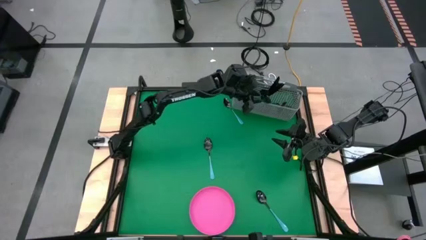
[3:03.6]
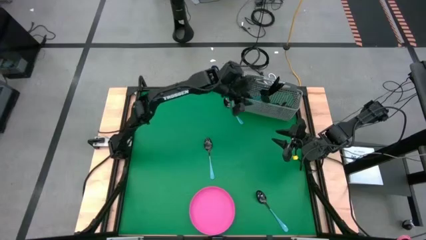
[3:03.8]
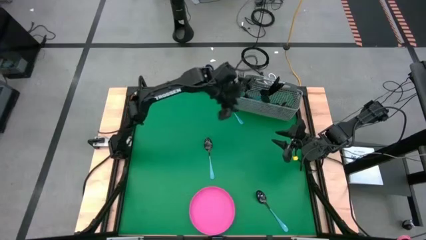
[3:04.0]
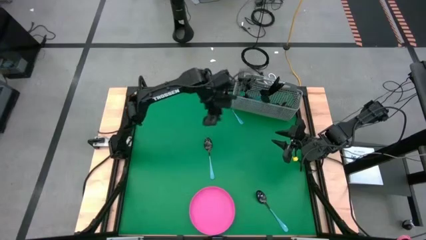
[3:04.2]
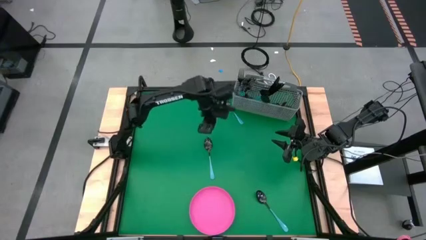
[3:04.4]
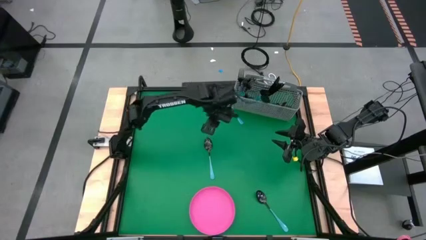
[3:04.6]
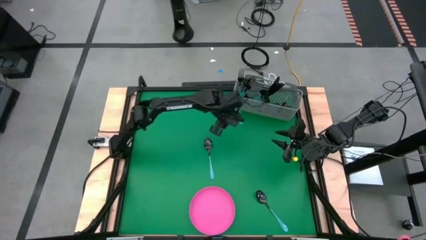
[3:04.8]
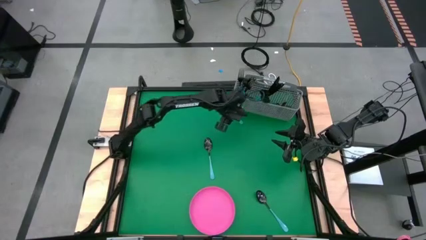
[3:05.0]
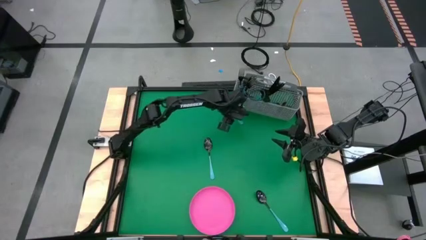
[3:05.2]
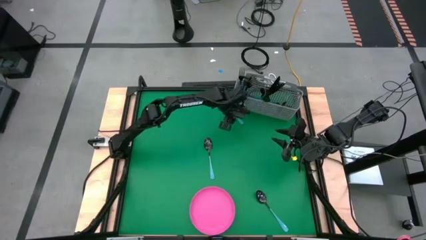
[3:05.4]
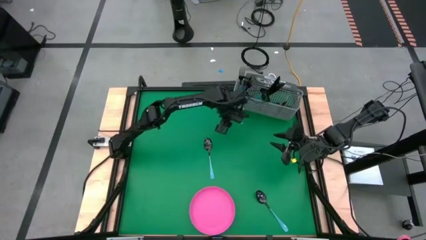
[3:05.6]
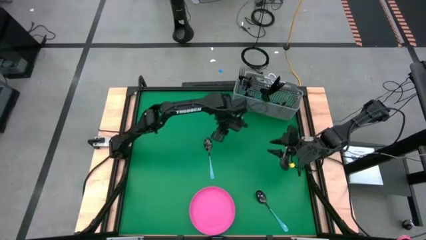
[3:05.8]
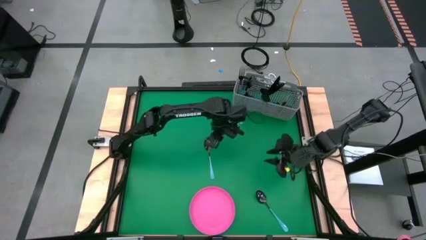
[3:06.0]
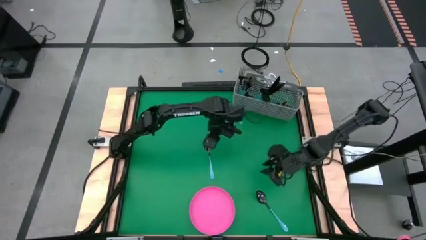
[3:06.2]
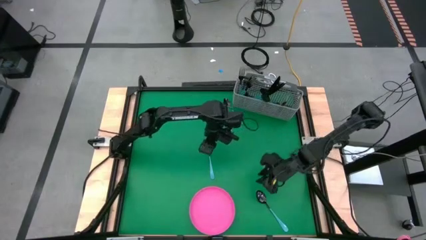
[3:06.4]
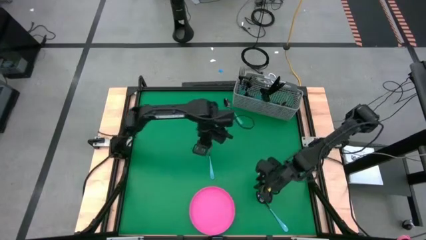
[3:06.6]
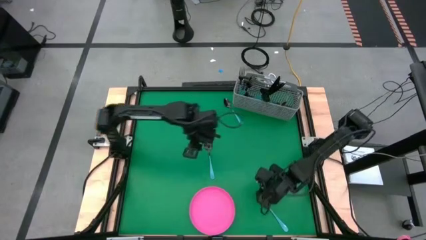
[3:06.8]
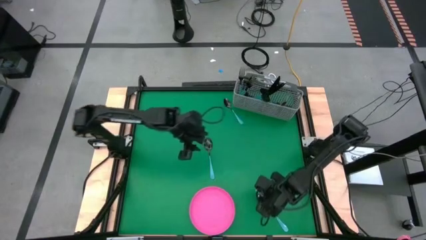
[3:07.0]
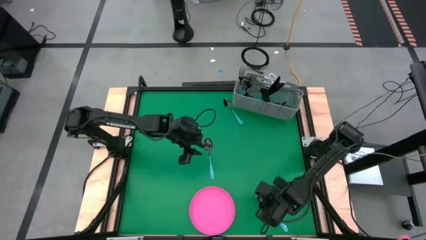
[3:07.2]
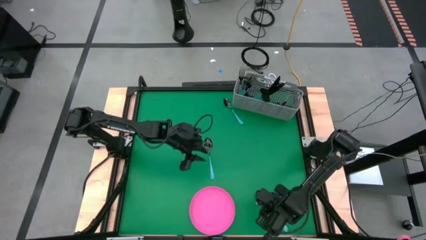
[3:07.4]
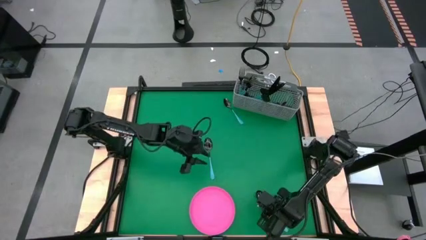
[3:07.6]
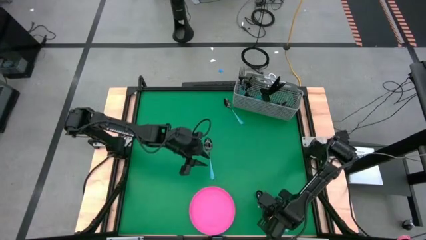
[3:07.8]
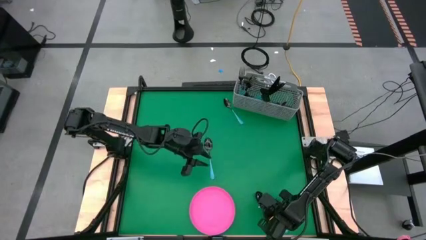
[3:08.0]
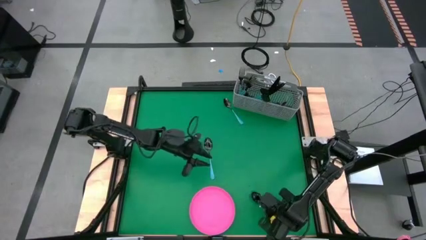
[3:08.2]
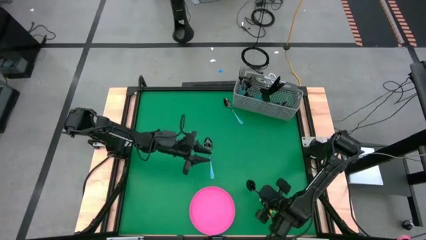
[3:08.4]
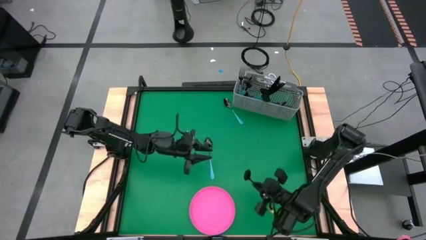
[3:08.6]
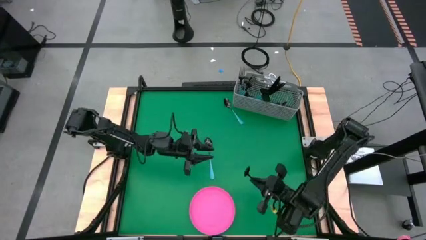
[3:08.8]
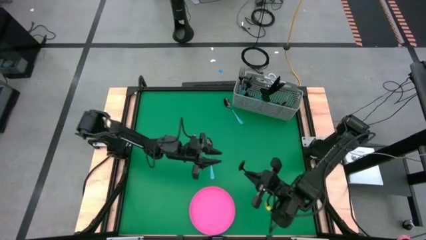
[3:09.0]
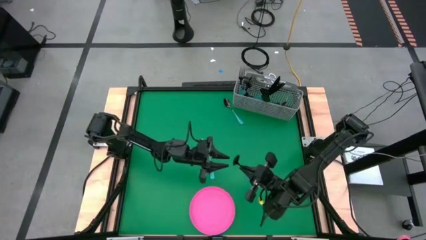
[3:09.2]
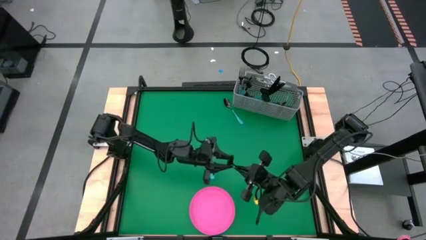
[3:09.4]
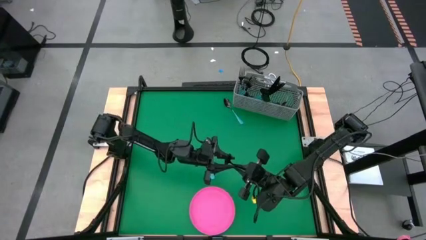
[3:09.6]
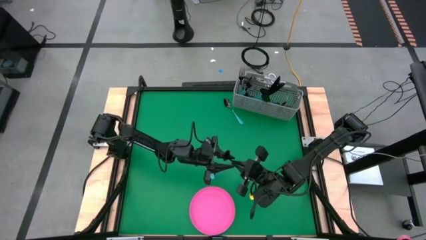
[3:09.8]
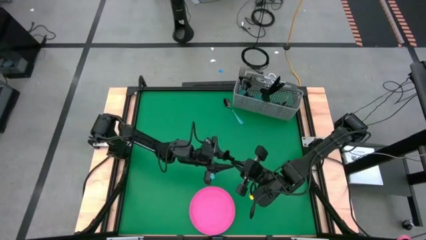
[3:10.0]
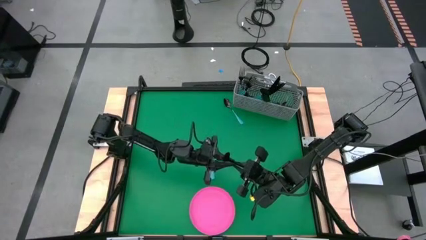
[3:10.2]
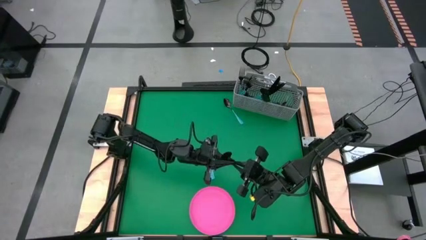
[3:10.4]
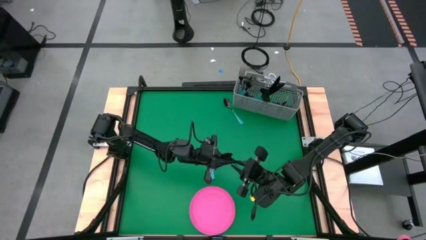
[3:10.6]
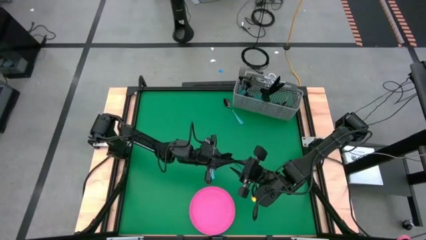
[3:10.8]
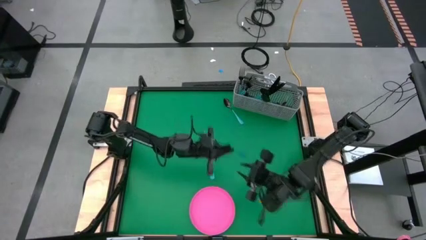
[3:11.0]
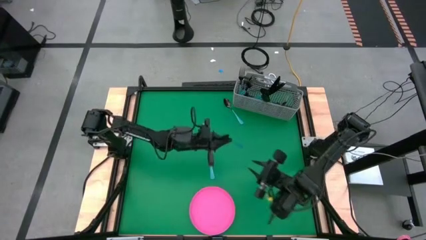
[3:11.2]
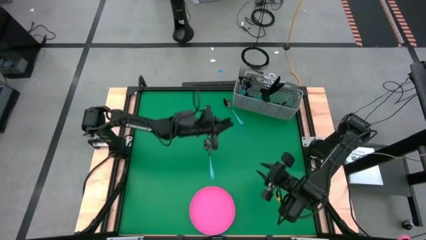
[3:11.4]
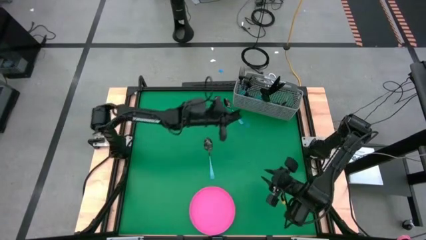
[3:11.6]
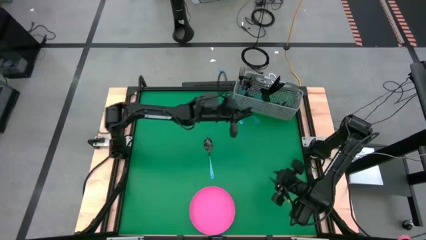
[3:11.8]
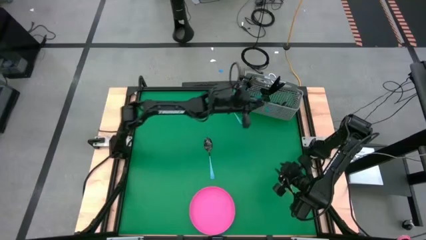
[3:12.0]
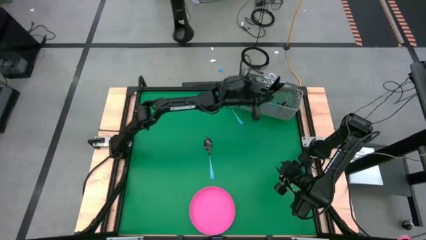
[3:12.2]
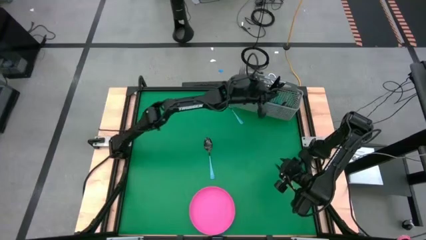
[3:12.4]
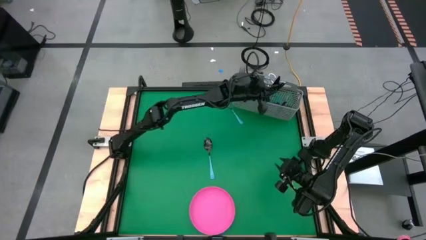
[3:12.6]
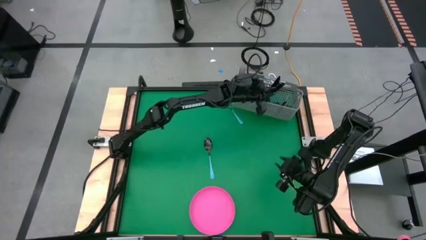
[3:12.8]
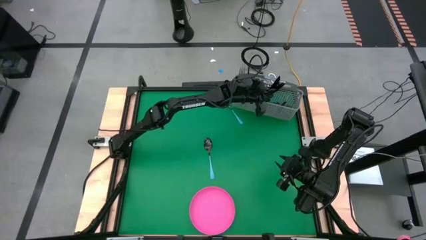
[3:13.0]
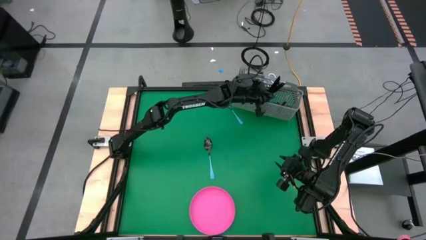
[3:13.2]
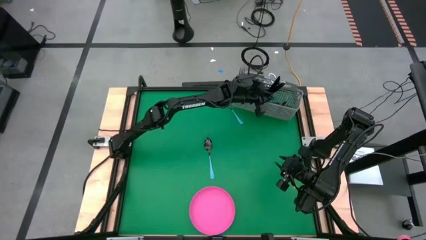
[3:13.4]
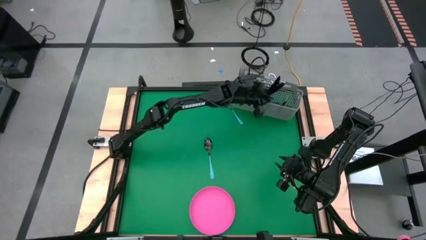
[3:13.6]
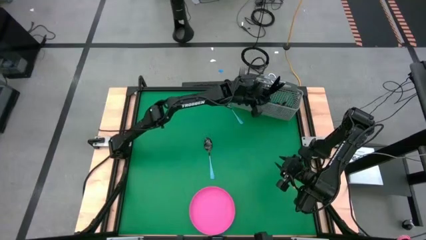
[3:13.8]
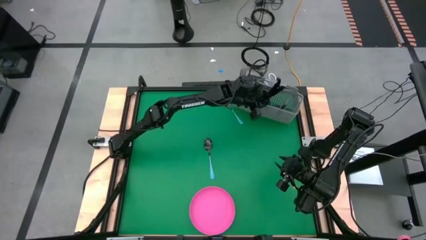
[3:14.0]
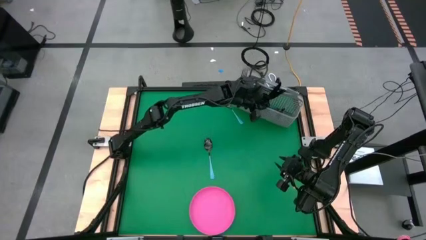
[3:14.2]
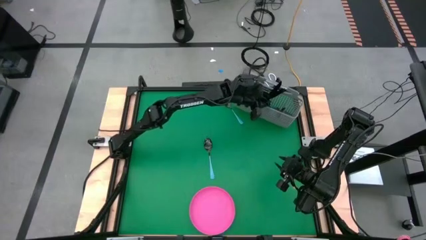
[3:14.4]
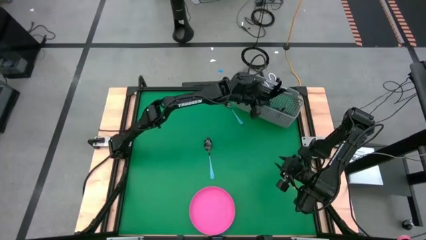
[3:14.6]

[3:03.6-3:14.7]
Task: Sort silverware
Put the blue spoon into the utensil holder

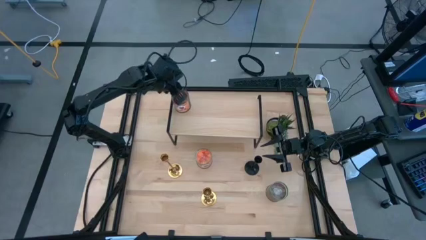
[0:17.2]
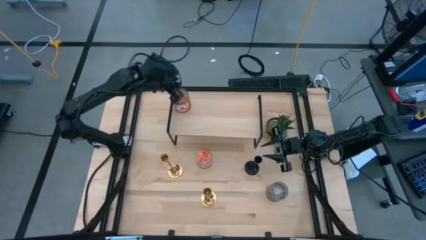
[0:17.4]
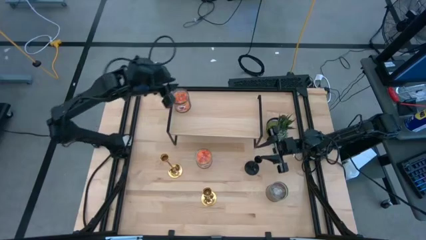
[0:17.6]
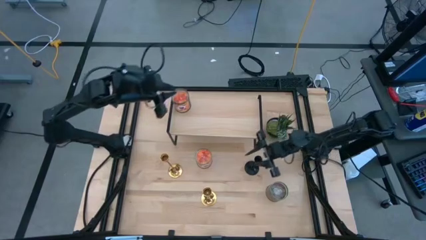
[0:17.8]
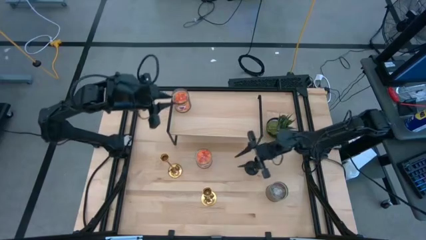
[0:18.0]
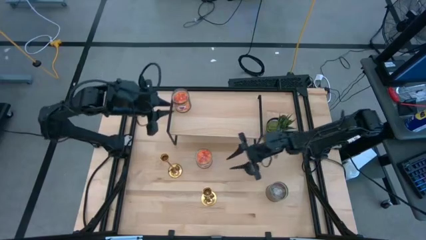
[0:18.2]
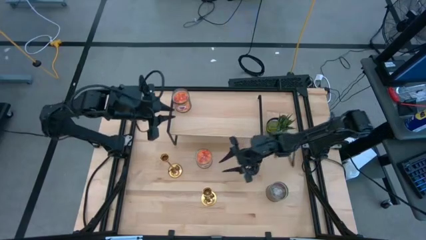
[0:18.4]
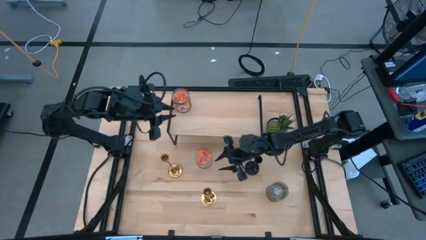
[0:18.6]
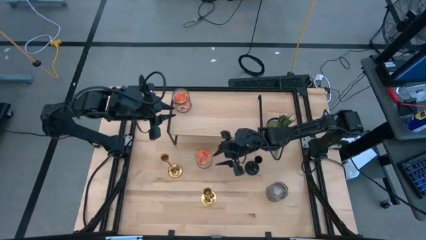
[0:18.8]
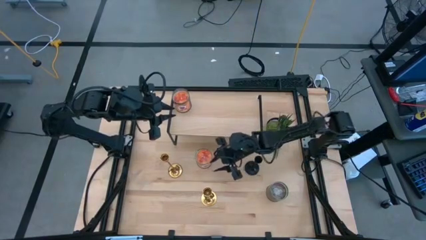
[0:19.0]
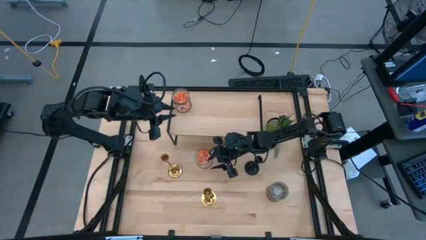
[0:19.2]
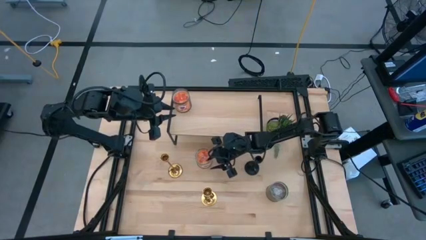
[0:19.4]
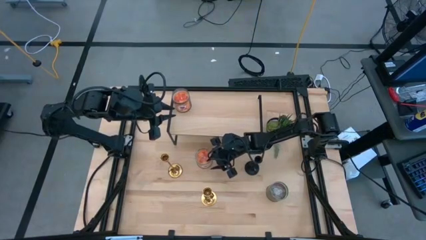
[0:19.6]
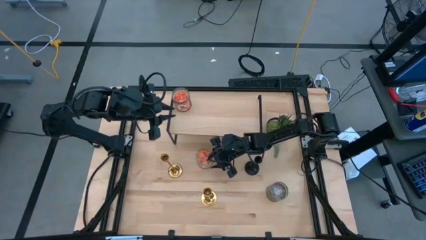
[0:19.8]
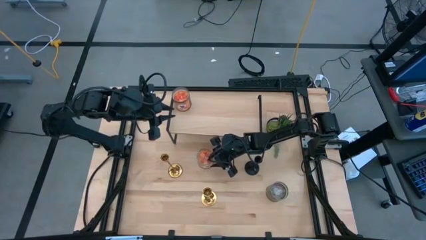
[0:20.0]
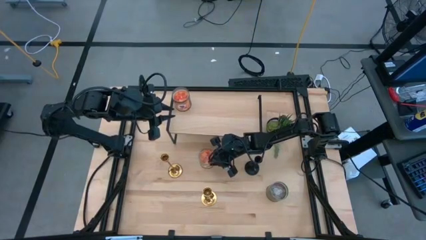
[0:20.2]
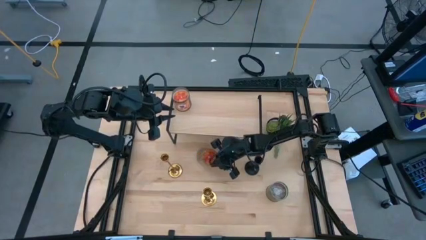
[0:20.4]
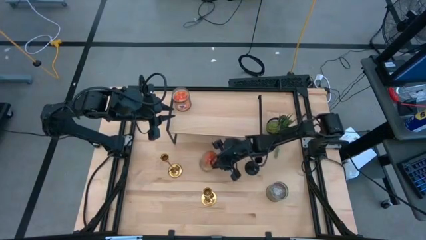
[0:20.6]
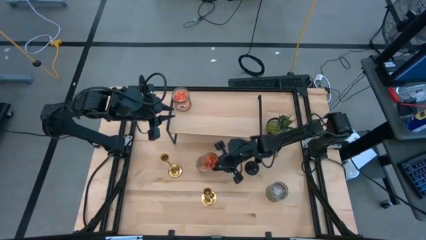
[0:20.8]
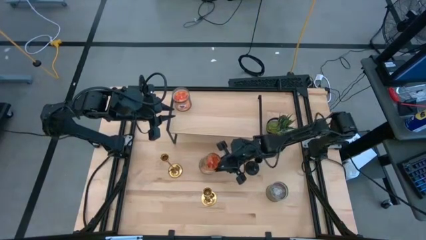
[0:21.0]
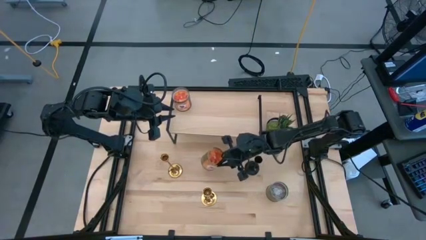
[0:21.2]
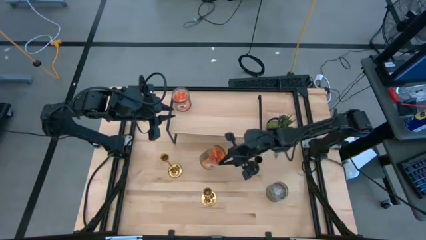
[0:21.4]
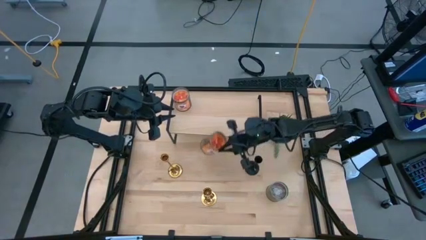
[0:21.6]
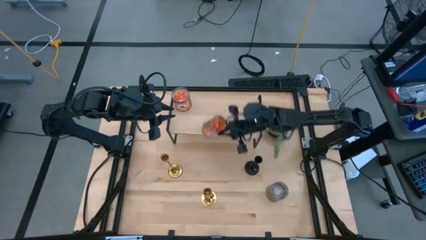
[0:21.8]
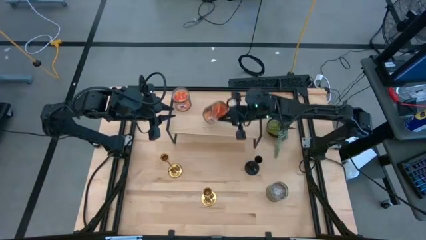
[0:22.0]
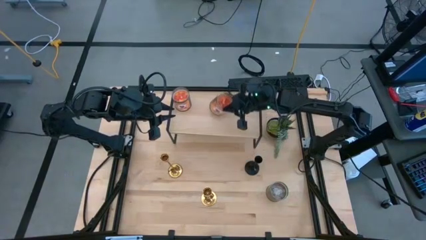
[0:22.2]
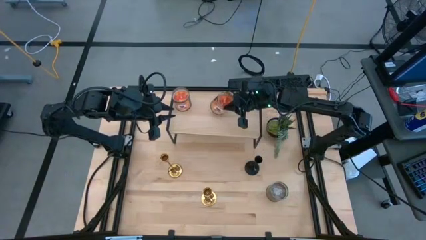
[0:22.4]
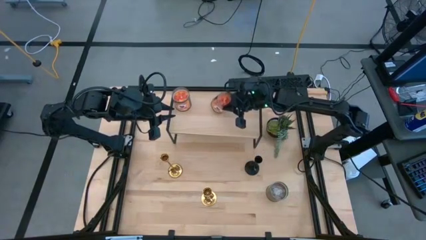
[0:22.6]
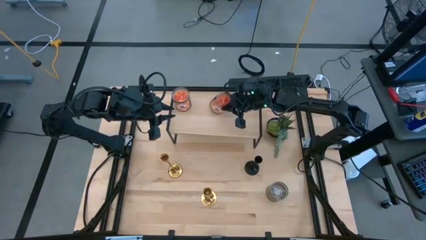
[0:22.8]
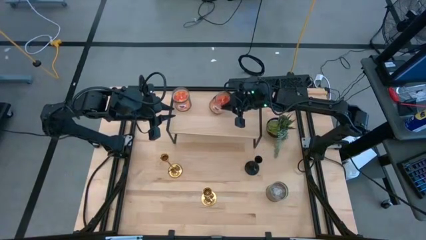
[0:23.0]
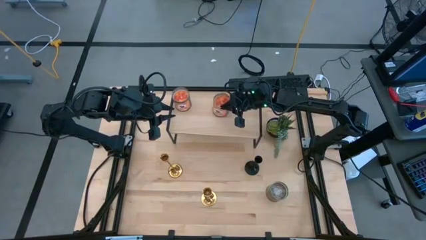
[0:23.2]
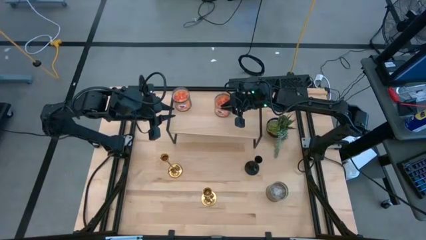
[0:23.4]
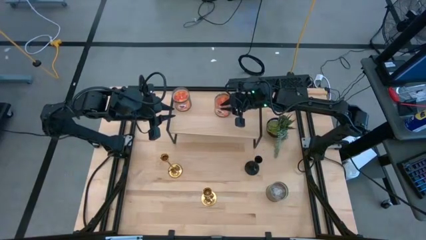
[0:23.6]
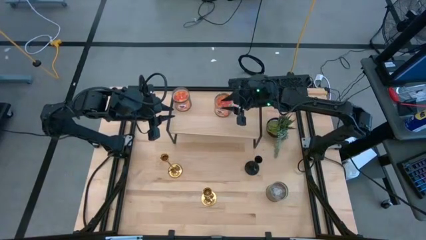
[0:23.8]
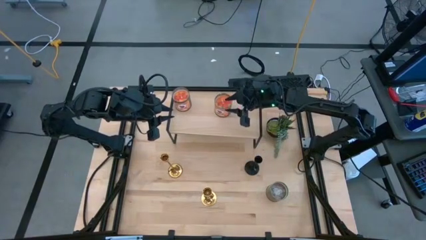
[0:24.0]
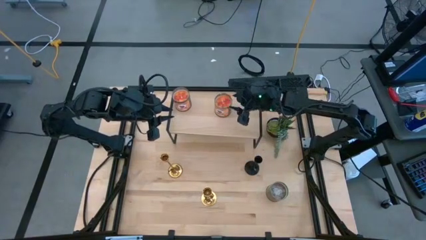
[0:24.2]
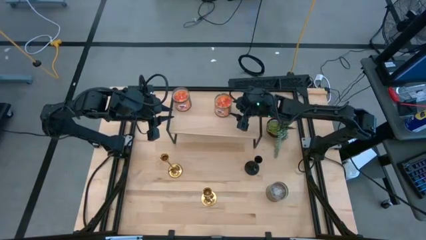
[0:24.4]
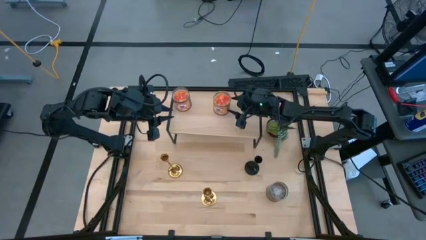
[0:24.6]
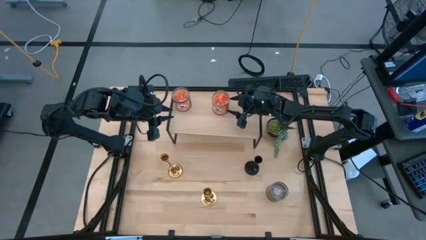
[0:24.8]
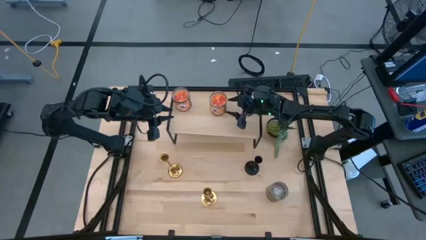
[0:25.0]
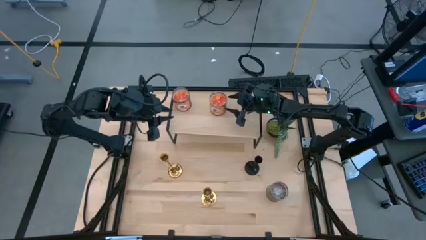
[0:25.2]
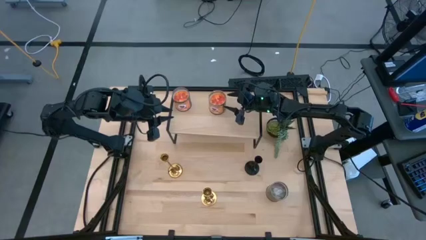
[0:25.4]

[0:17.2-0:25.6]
Task: Pick & Place candle stick holders
Put the orange scented candle on the shelf
